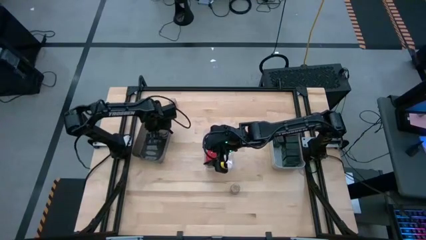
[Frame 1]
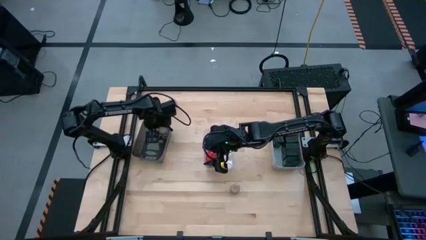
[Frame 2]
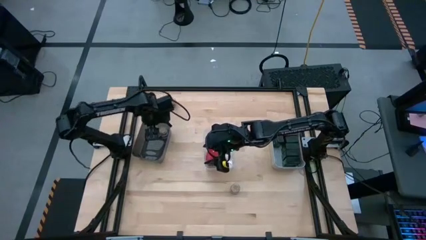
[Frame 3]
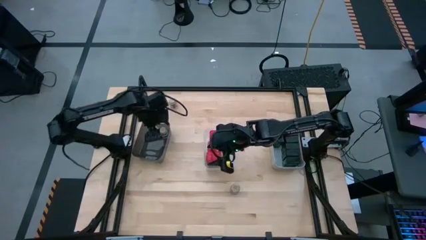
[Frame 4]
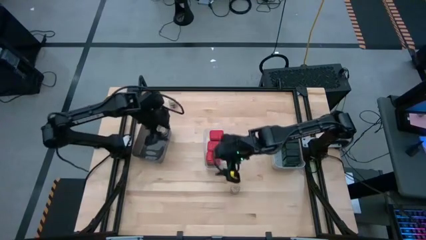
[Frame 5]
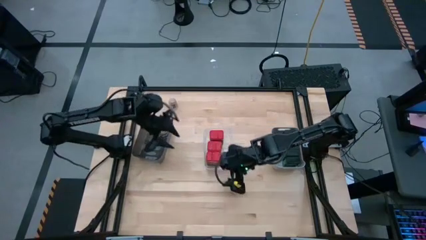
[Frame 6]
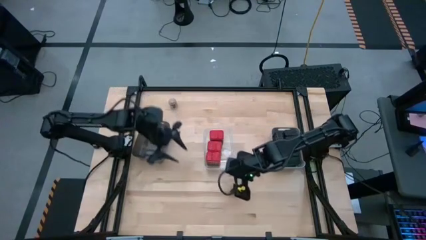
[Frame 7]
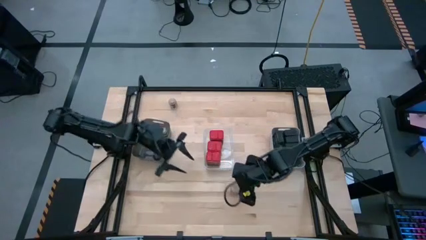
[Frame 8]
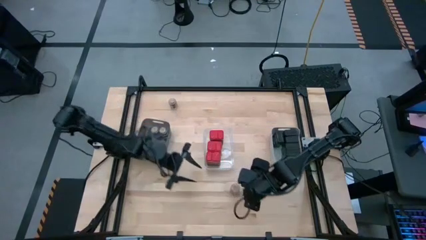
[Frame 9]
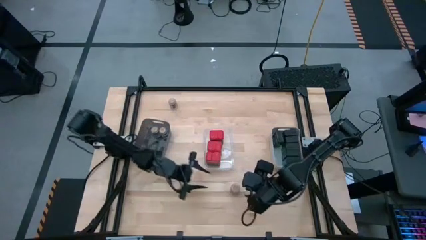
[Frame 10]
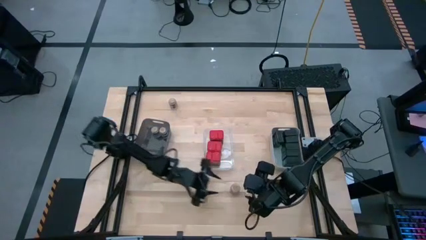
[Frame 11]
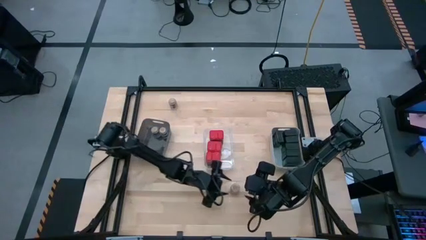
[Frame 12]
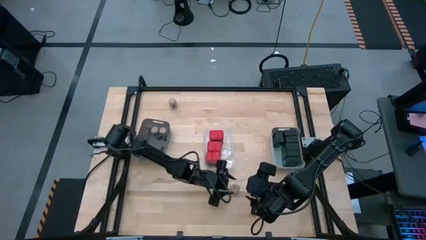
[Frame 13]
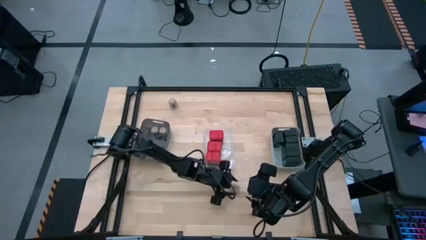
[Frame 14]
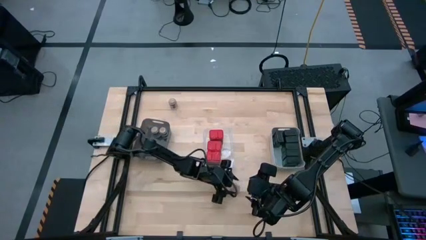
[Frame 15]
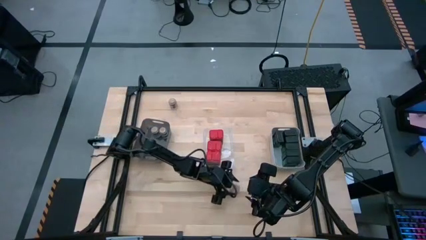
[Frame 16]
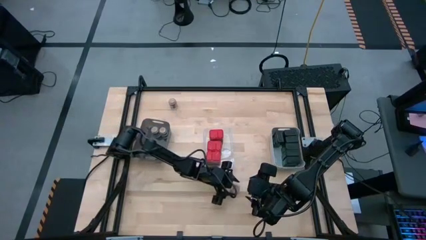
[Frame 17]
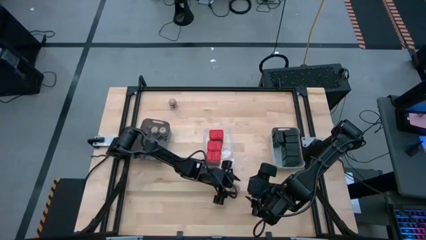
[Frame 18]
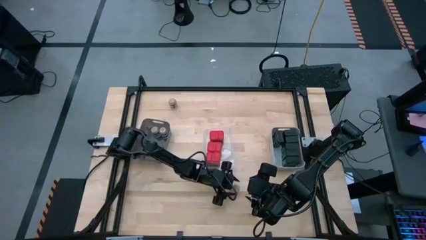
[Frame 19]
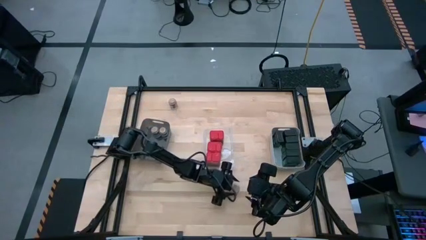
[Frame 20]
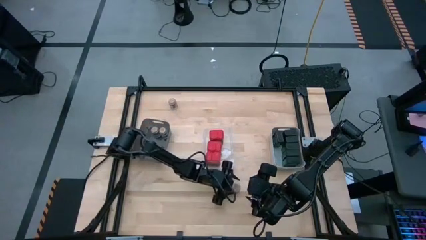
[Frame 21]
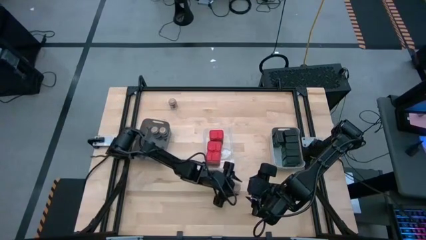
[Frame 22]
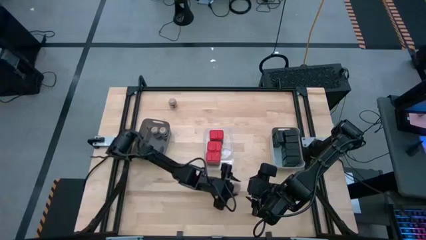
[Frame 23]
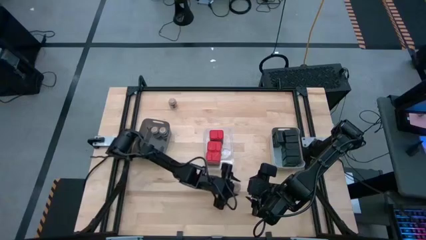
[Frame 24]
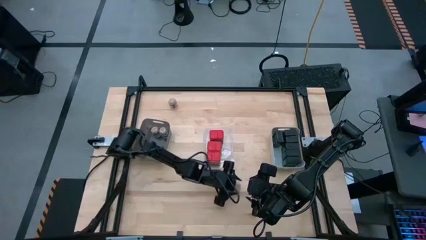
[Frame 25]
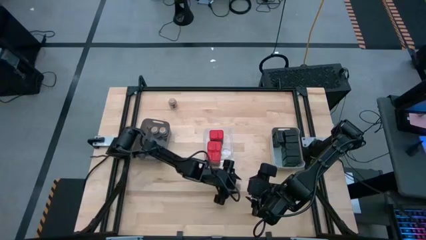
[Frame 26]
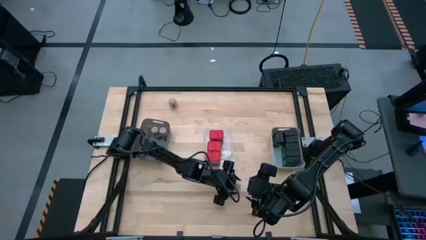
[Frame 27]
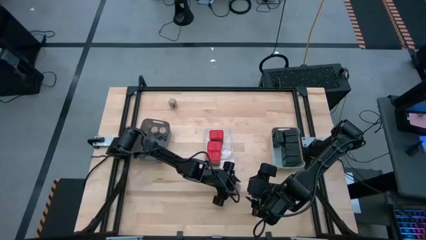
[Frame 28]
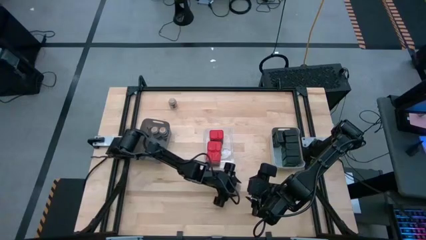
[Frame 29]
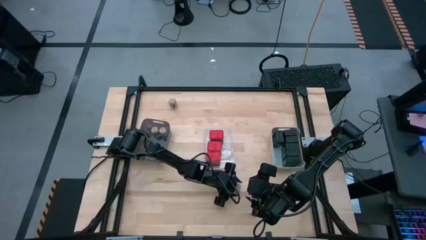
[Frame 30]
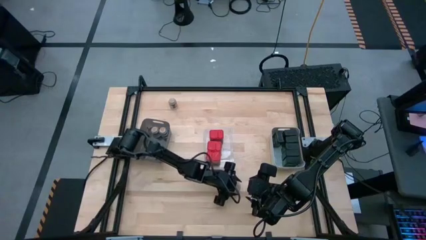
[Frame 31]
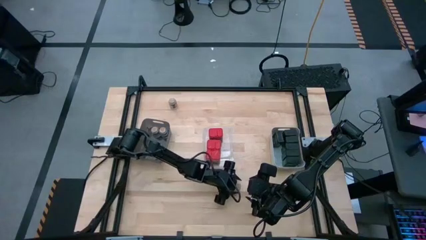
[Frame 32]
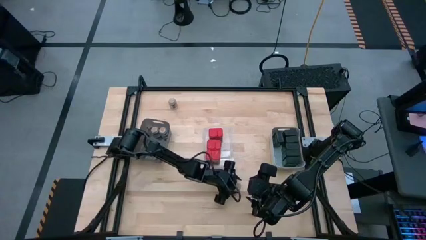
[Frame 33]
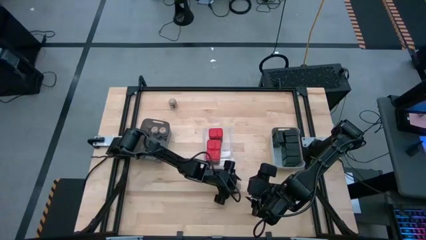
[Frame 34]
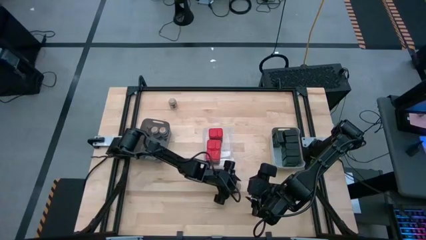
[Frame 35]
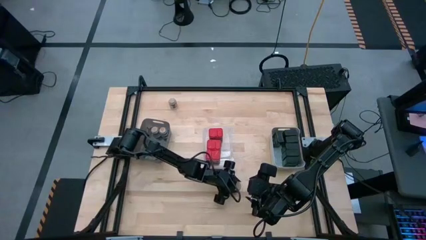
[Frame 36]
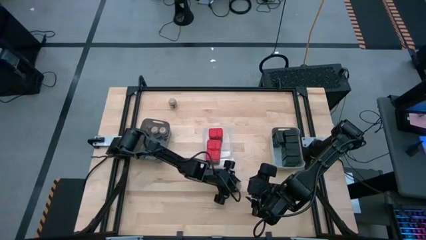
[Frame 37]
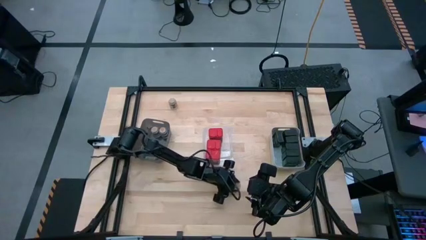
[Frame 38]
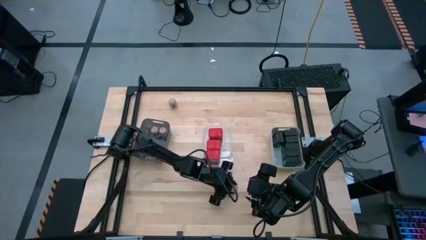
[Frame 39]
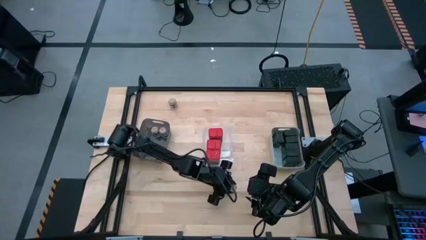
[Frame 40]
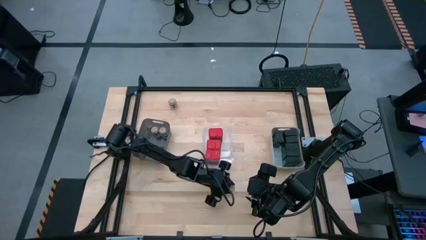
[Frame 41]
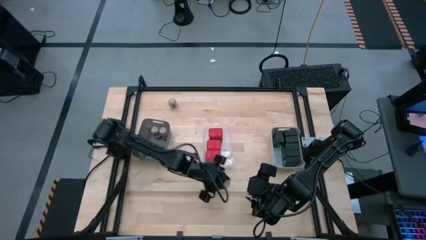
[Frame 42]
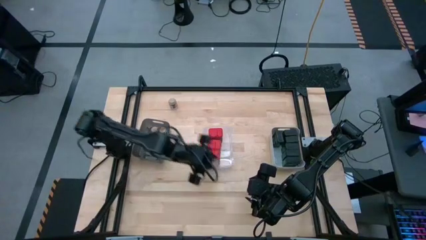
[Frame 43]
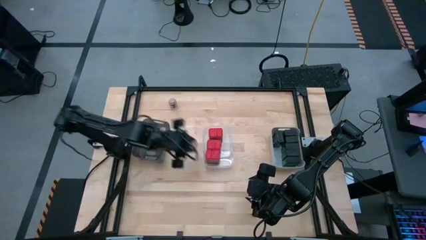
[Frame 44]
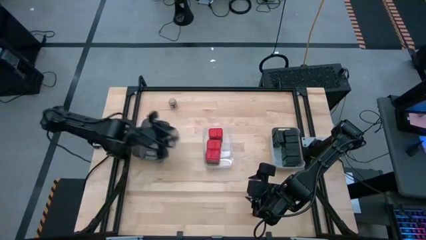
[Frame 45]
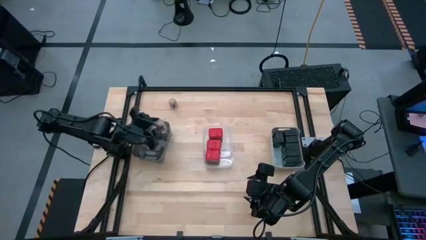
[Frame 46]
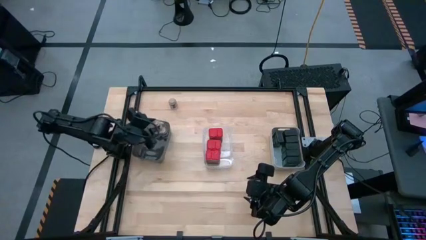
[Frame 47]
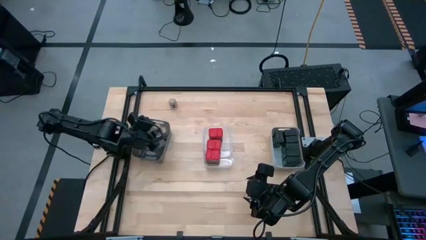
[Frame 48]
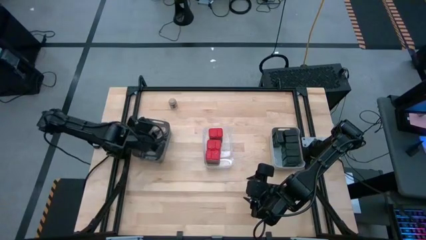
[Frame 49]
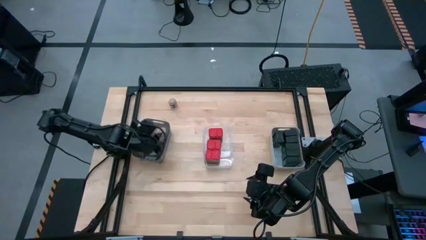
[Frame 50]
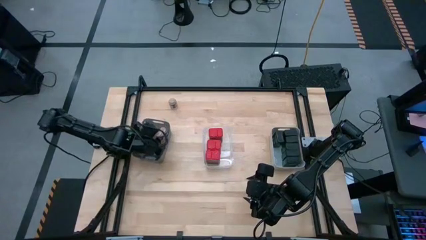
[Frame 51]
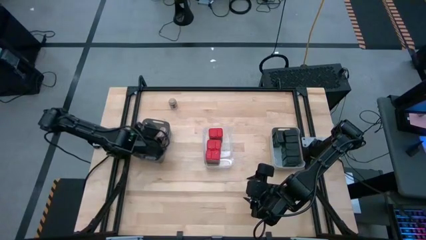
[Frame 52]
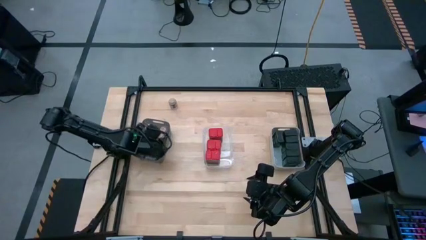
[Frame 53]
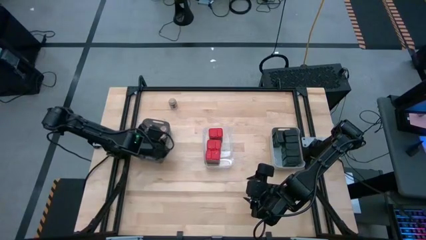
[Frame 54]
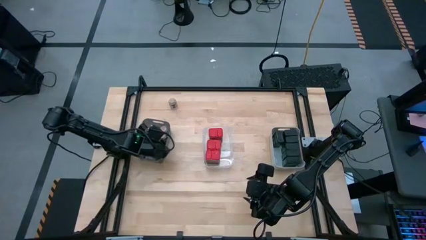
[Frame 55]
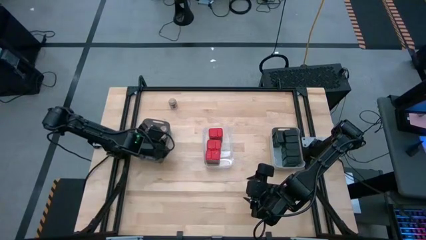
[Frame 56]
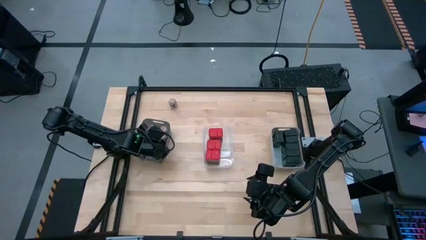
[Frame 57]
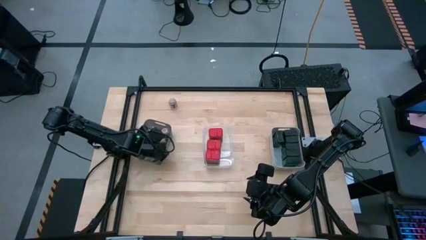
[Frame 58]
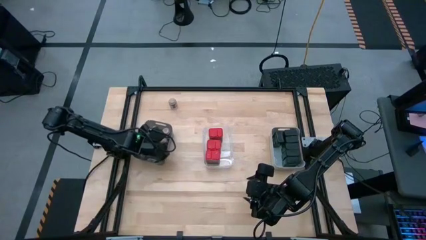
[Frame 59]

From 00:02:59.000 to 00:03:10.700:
Task: Sort spices by type
Put the brown seasoning bottle into the black bin

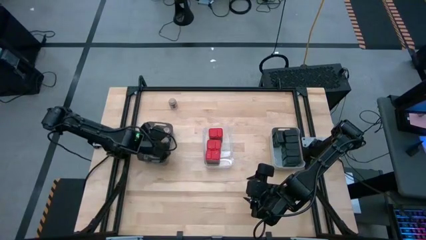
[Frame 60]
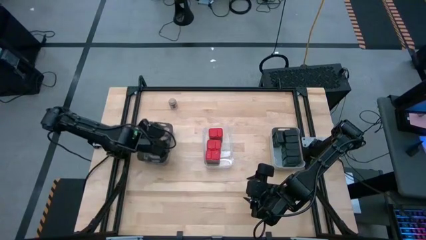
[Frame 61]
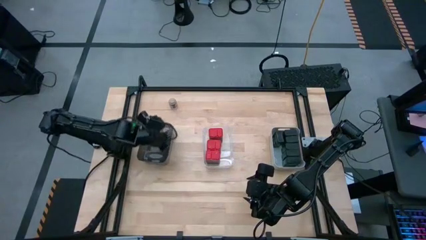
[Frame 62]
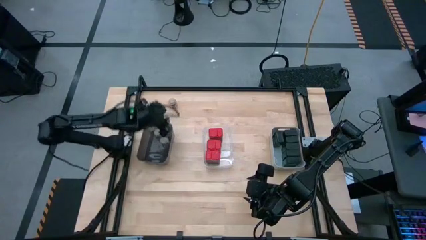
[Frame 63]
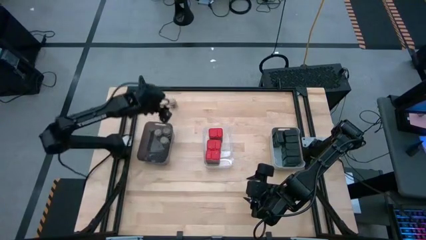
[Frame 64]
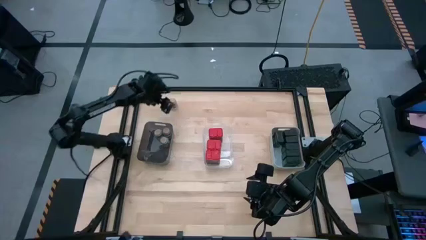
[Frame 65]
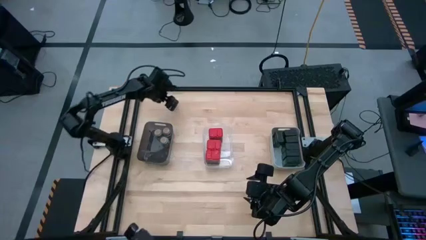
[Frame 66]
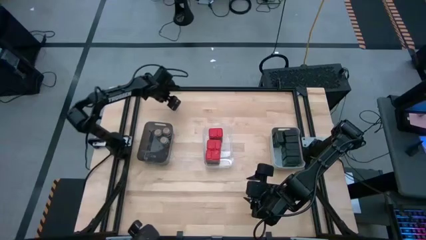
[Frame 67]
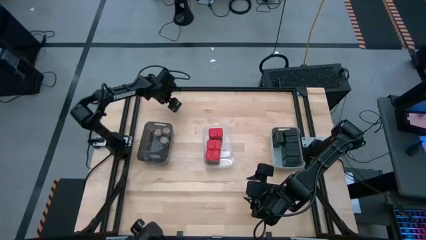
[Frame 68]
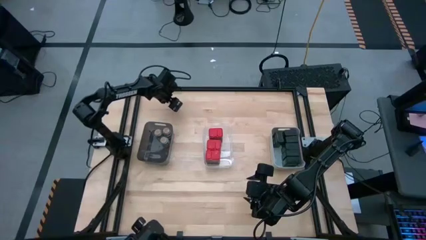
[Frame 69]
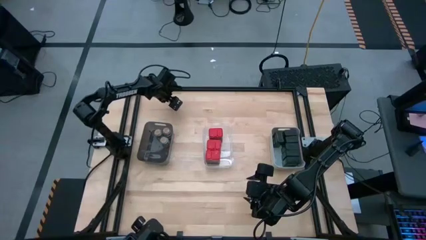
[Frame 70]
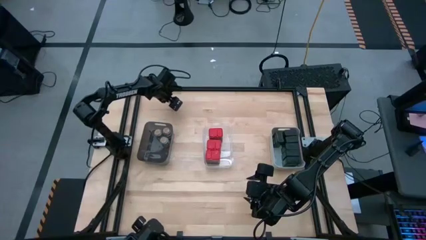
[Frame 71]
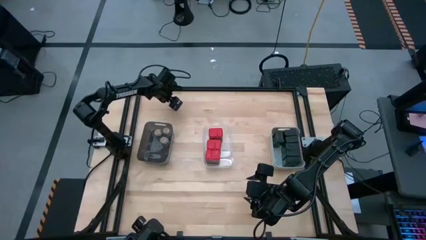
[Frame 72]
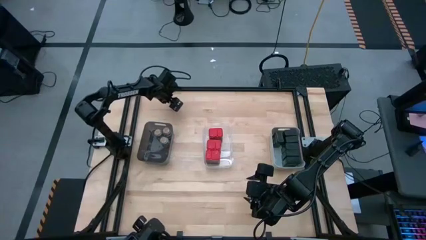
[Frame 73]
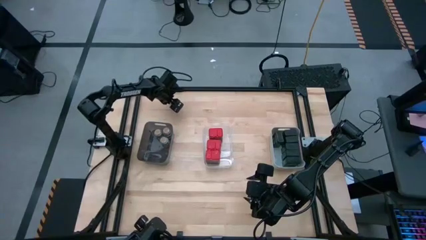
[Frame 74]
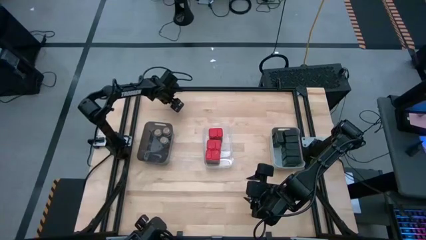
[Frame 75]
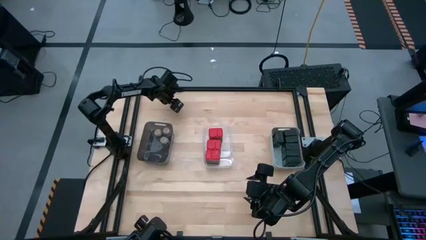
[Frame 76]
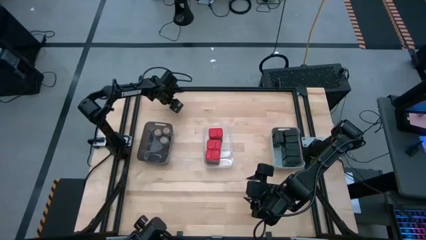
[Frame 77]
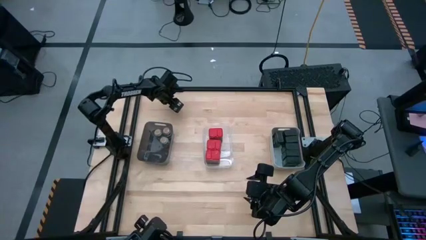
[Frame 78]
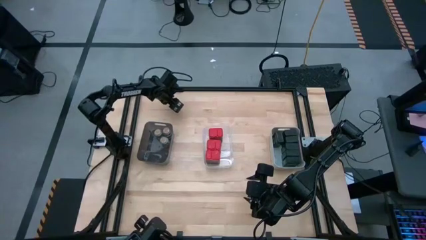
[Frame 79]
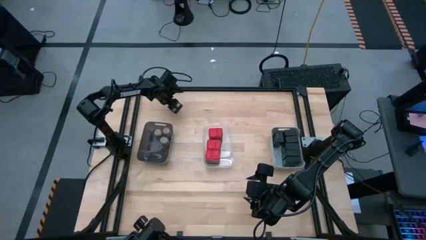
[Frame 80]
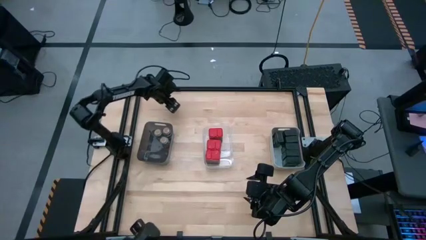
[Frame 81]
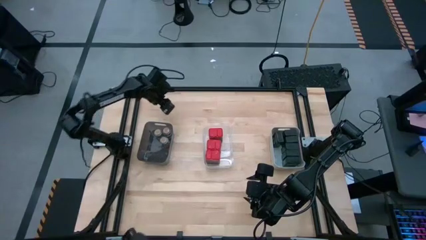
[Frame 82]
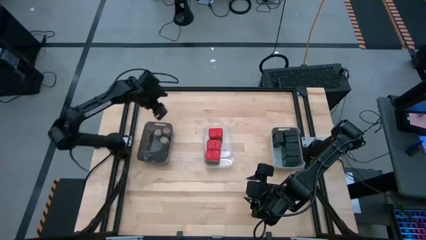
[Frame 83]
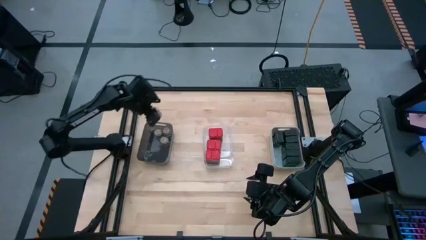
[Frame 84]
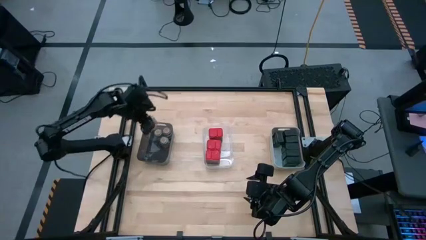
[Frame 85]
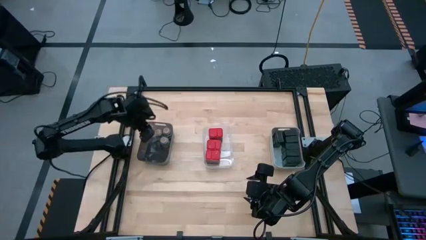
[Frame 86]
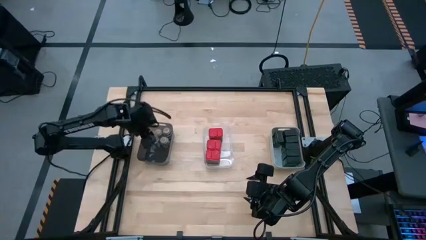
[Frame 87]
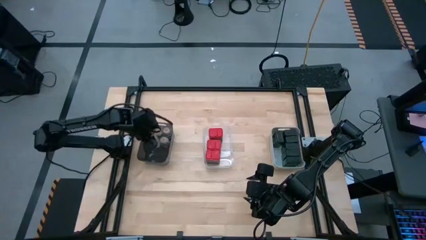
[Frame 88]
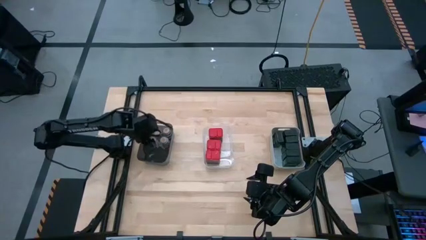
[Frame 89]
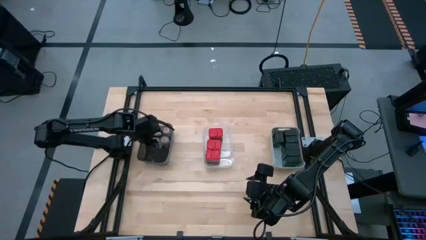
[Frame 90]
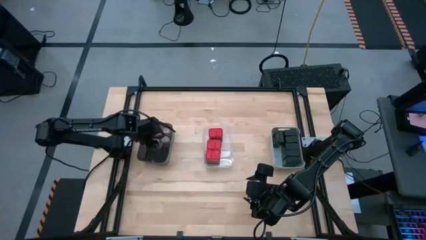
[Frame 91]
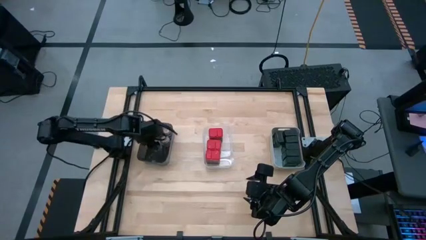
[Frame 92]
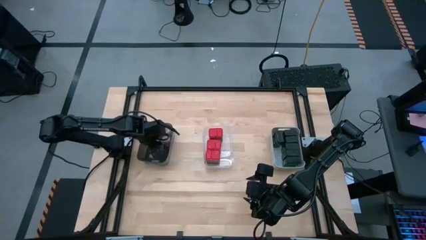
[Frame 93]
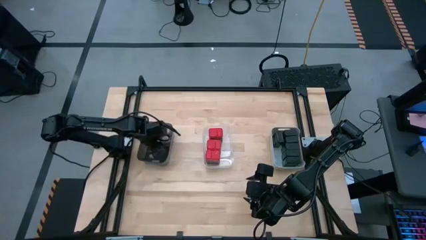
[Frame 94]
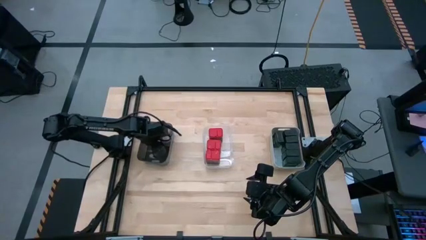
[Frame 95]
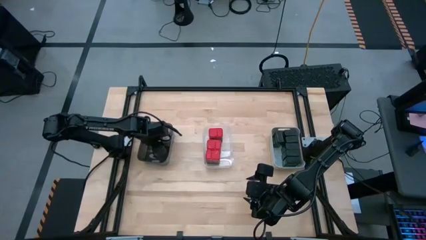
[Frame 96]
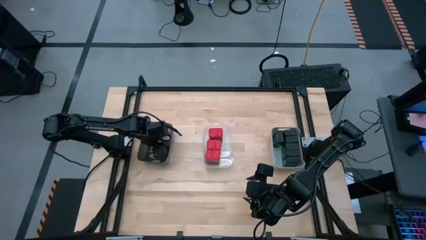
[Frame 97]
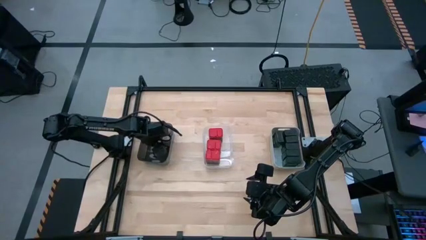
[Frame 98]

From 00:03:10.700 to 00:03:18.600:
Put the brown seasoning bottle into the black bin
